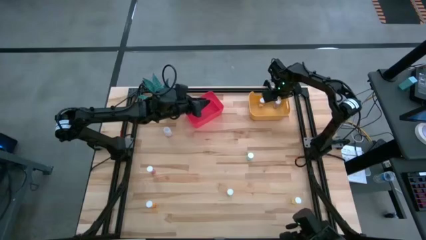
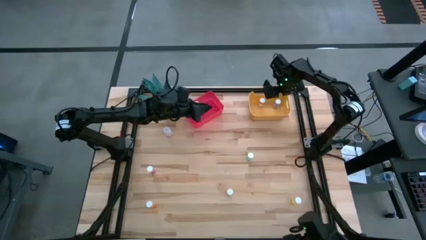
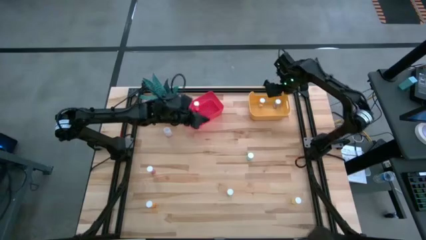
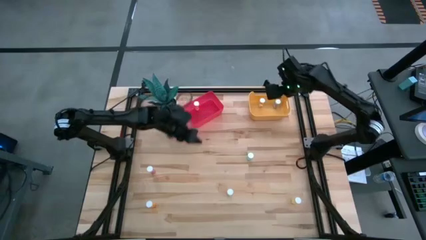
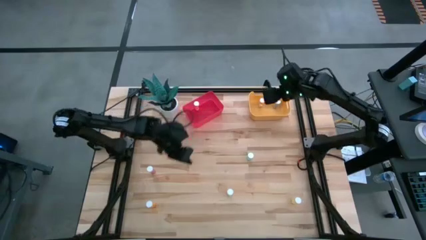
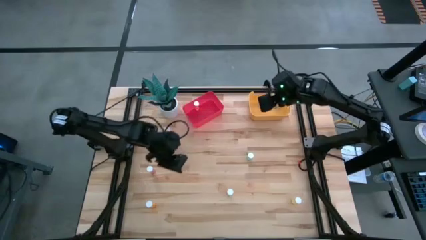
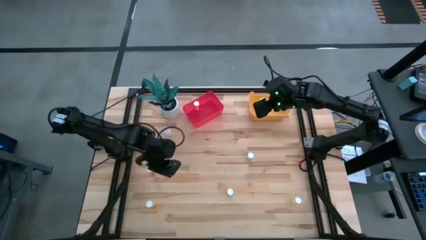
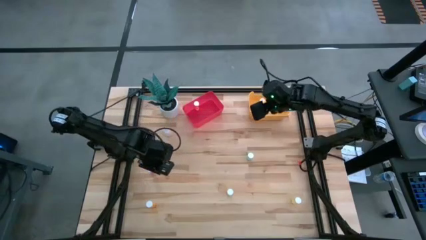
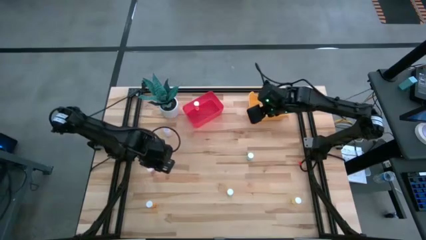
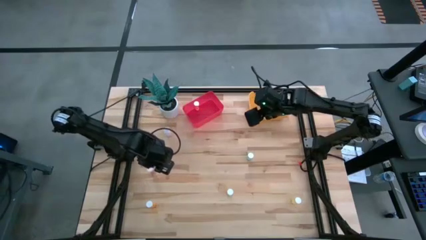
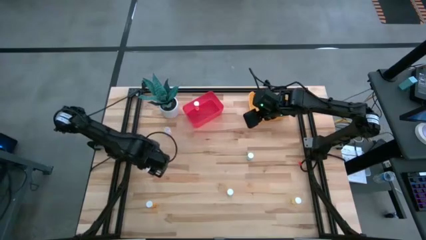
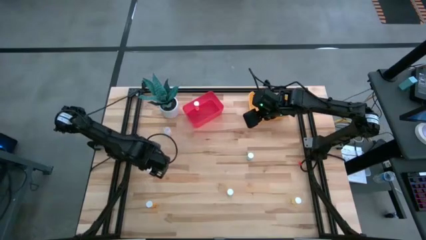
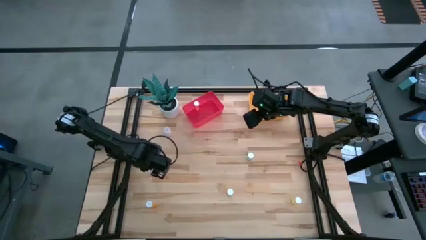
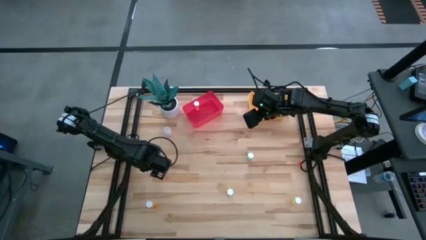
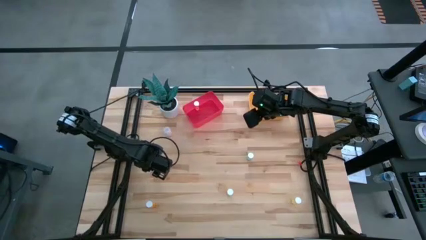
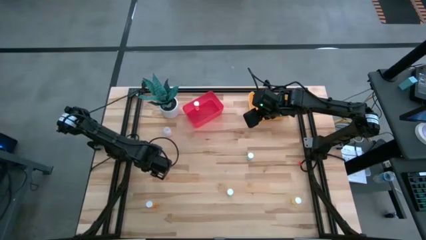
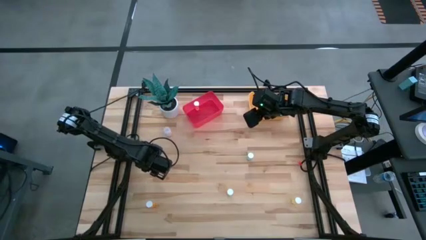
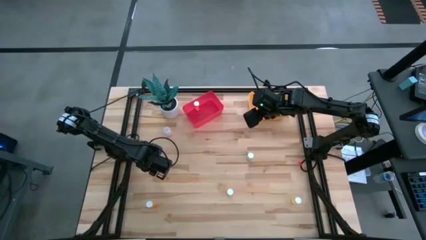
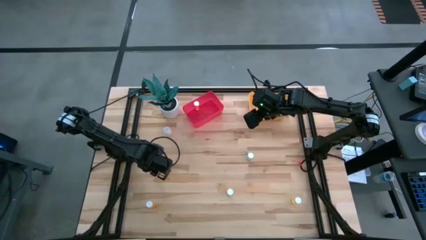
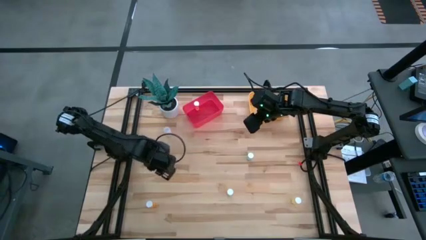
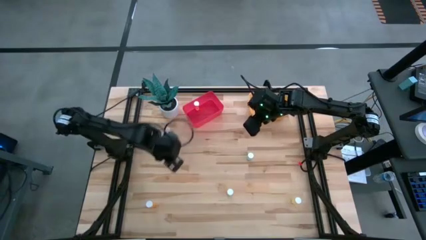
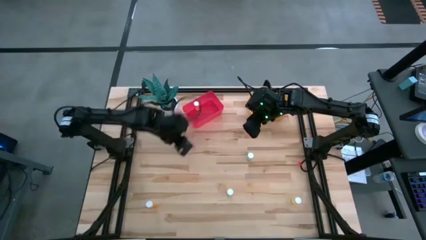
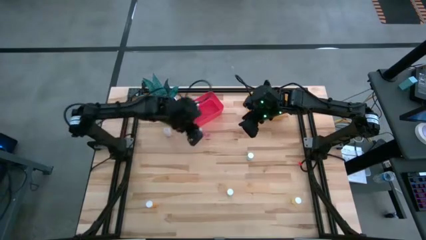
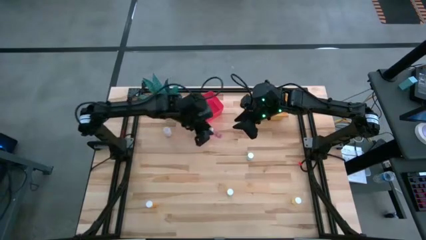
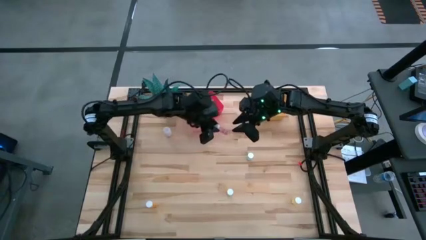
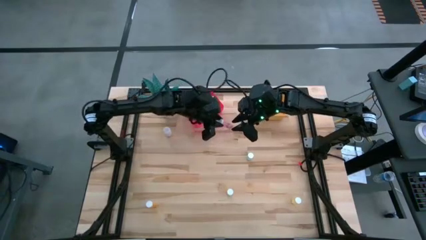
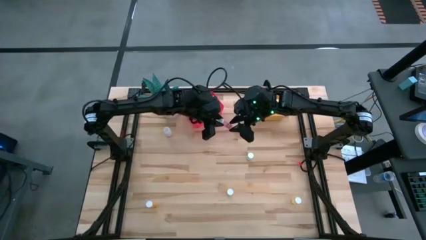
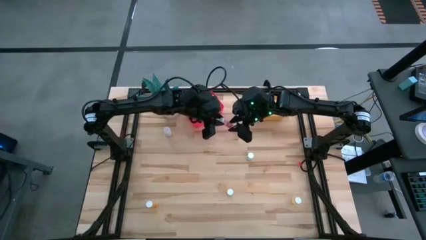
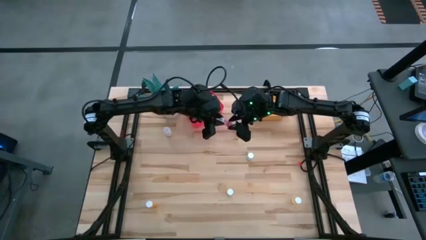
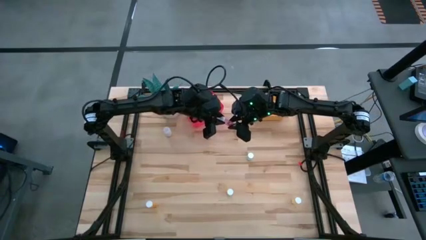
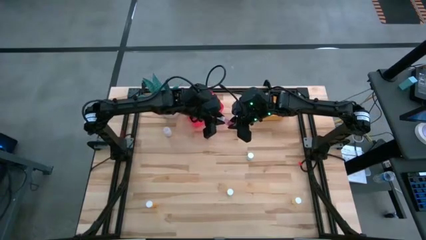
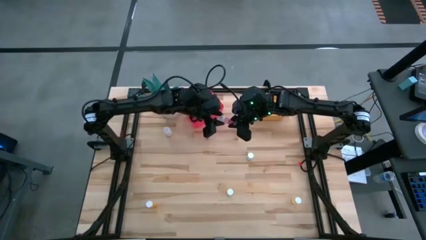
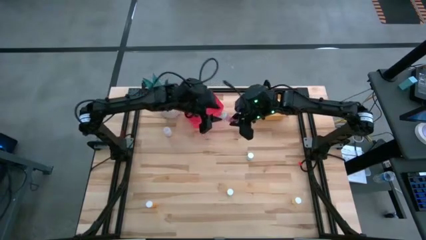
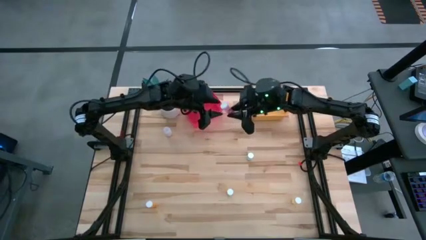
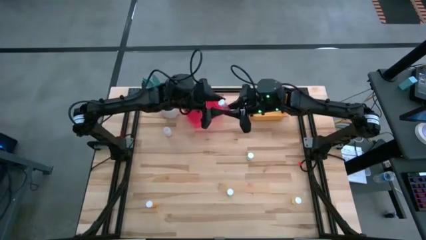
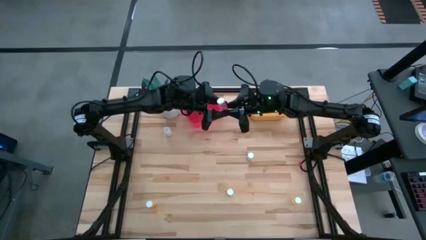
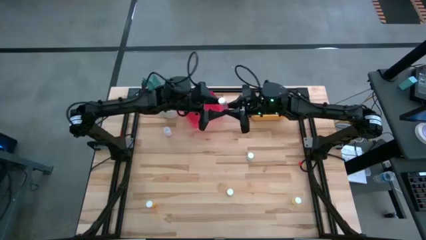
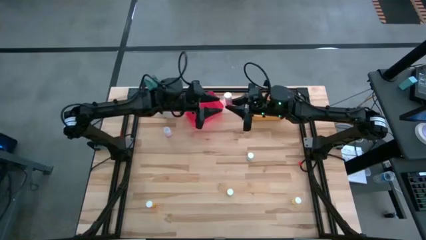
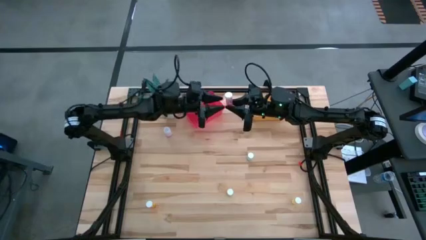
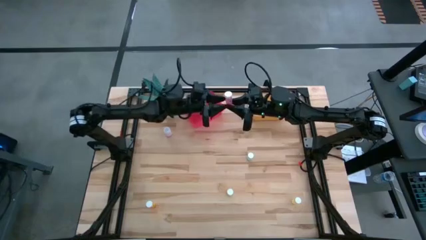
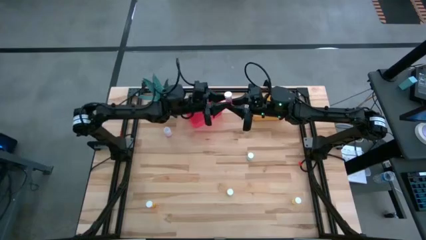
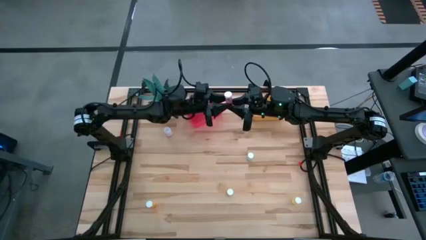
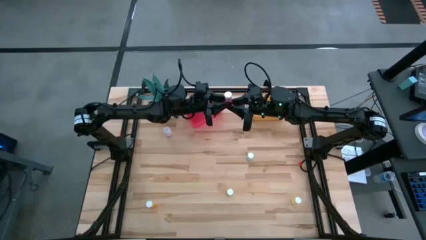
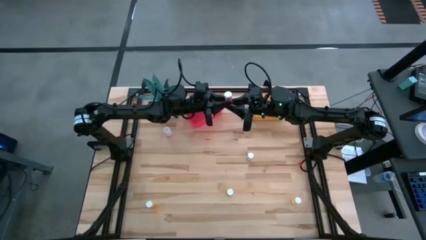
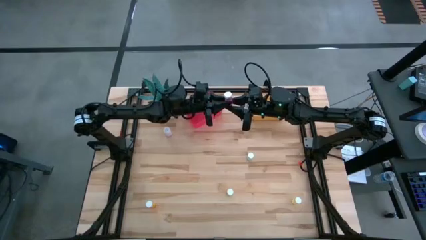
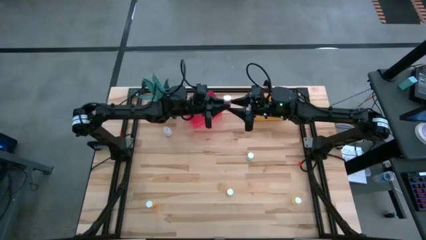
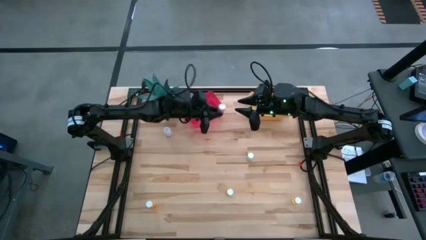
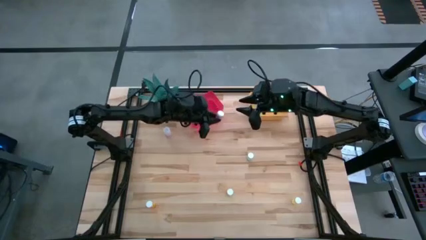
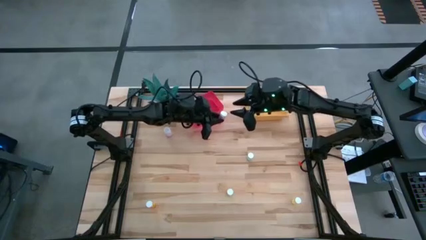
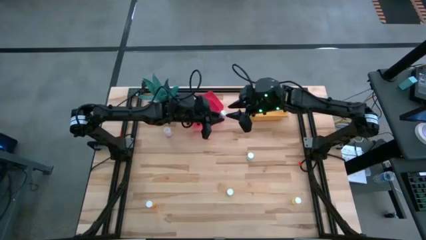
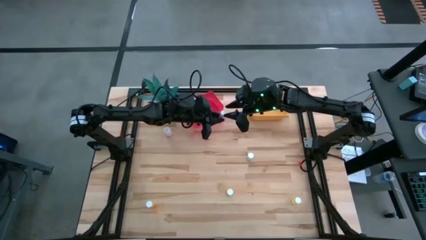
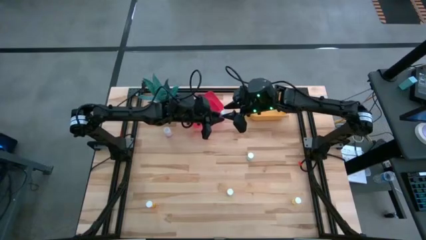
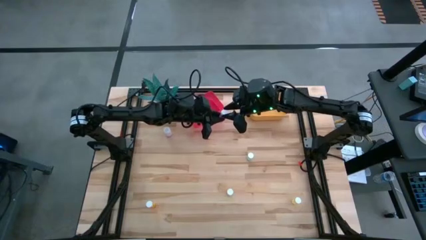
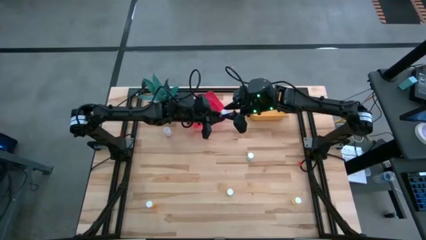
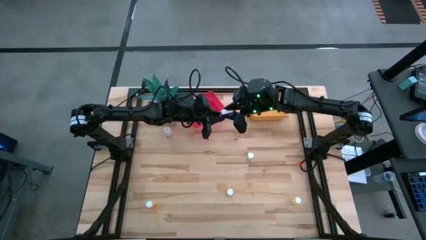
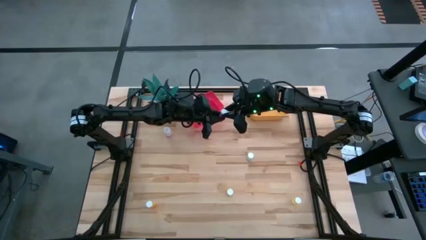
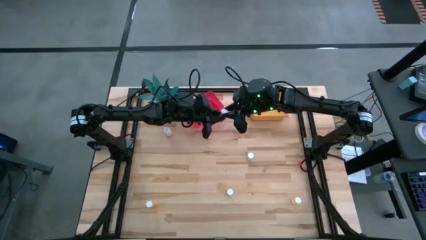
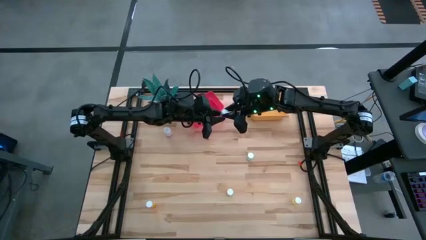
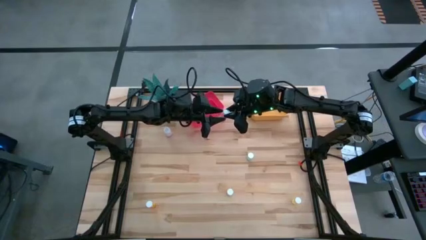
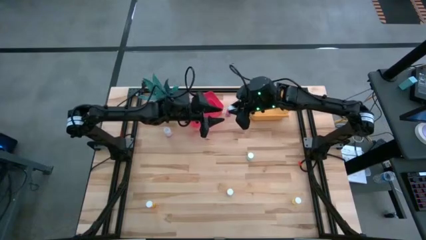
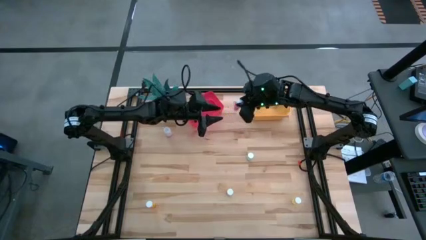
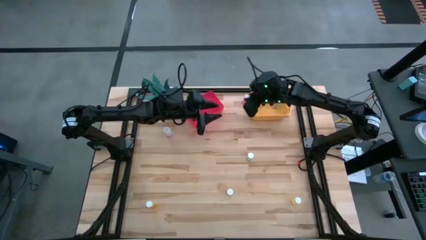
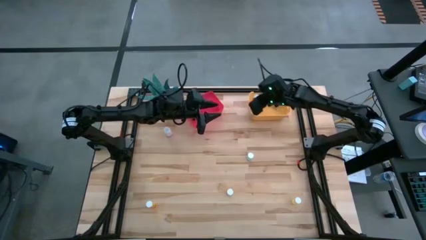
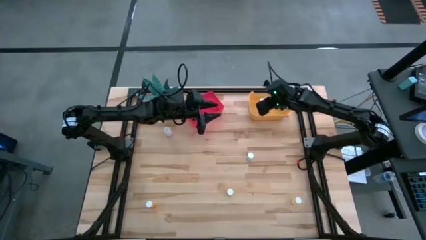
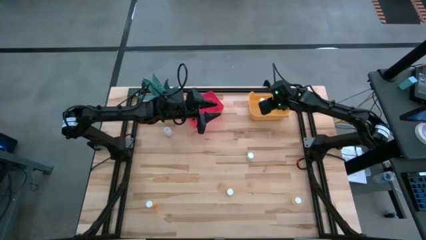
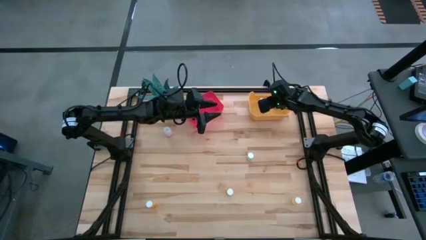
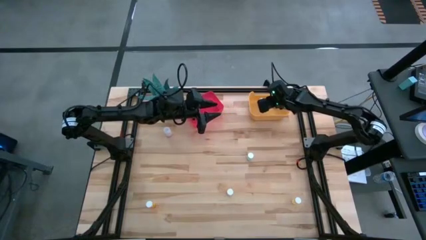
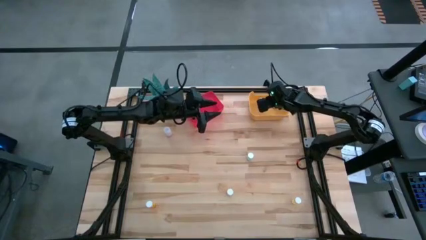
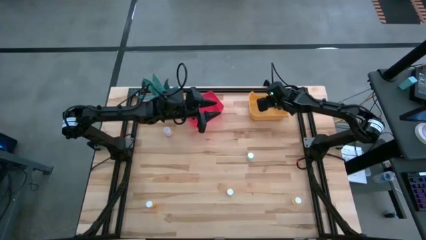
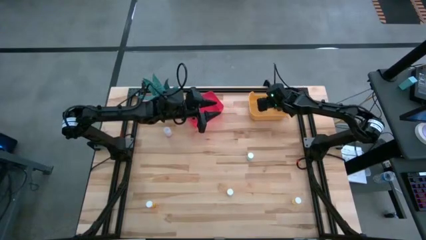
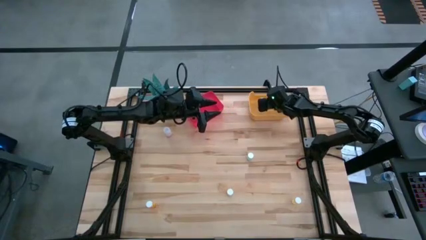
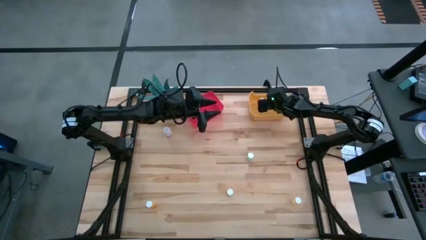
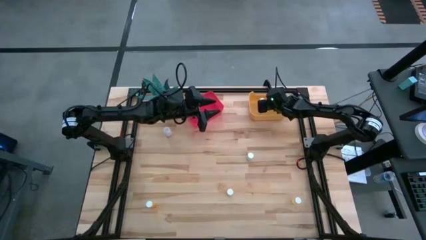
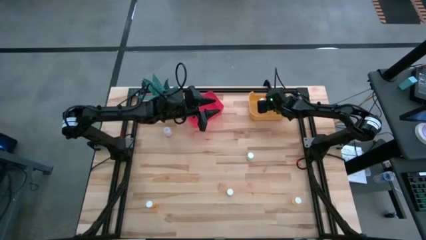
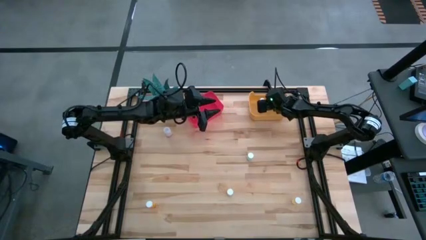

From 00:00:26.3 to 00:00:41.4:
Task: Pick and place medicine bottles into bin by pill shape (circle, oval)
Put the pink capsule bottle into the yellow bin

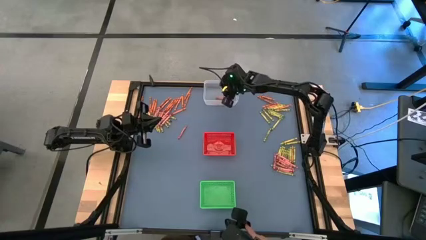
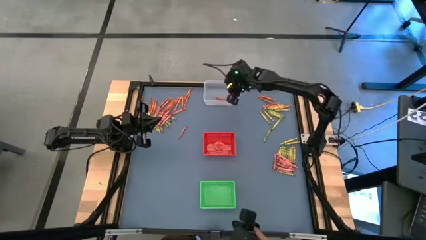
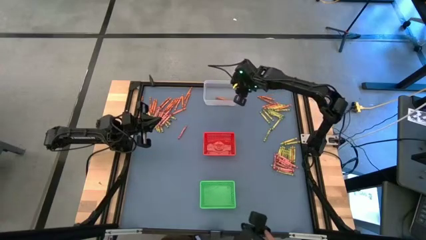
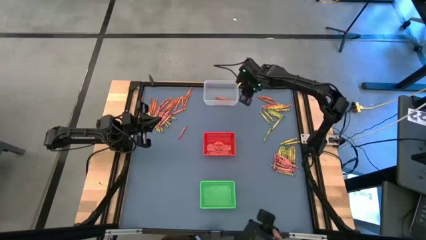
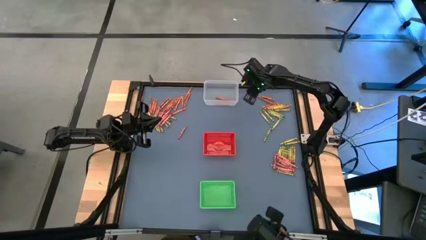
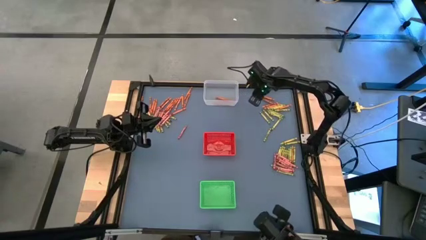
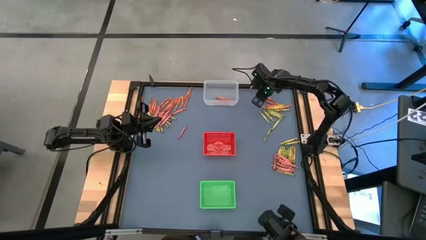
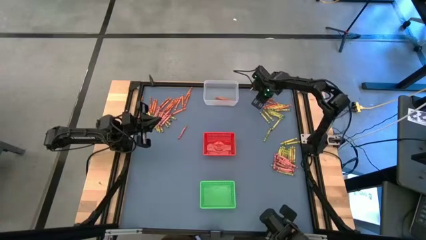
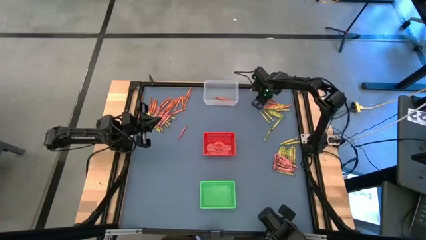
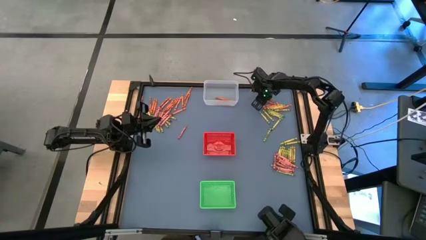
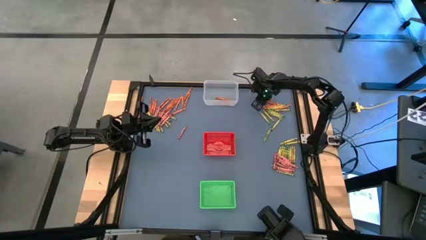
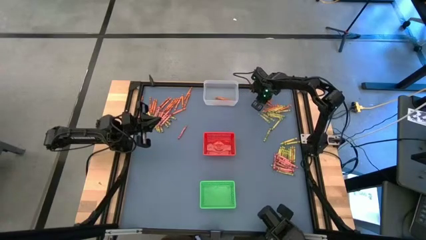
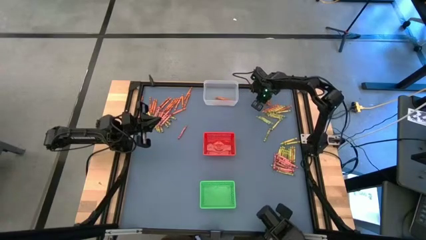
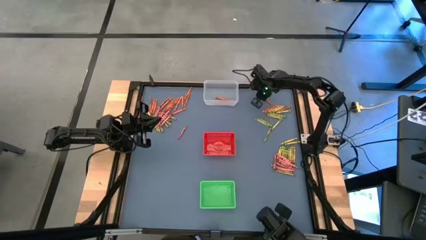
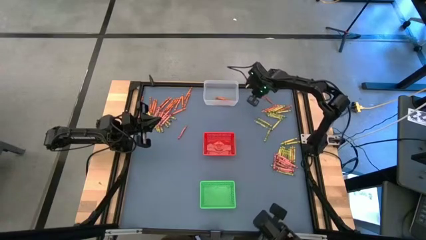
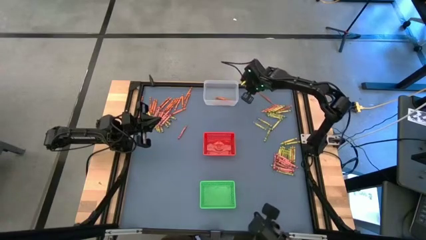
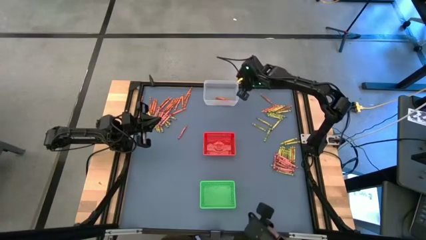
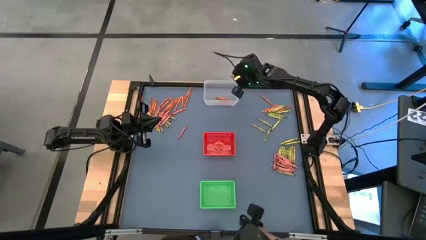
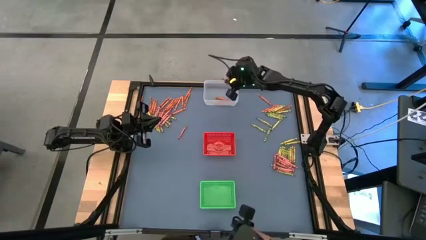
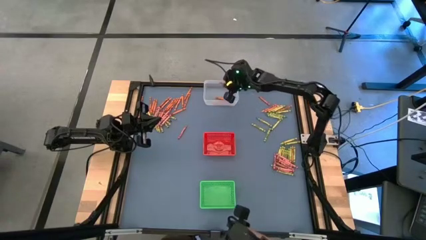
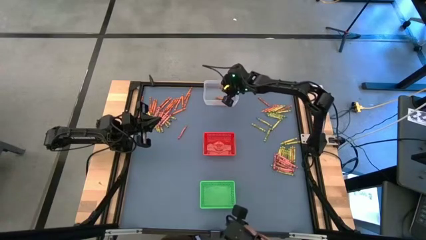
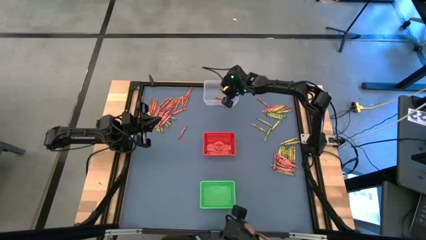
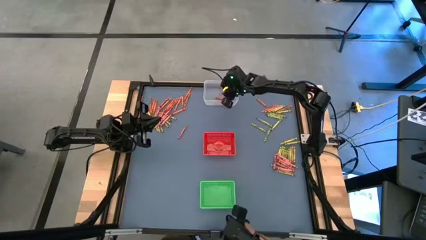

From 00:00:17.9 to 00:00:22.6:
Task: Sort crayons
Put the orange crayon into the transparent bin
